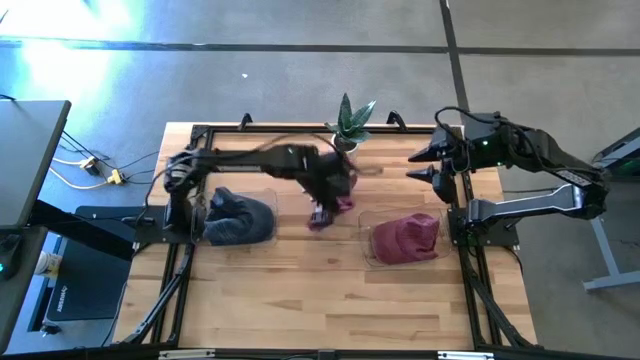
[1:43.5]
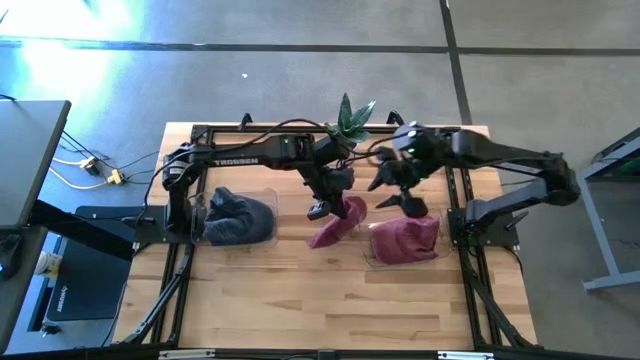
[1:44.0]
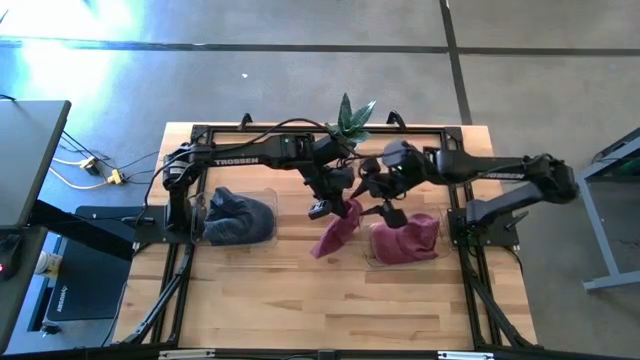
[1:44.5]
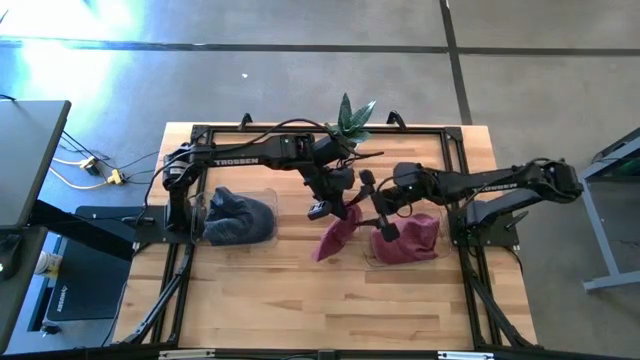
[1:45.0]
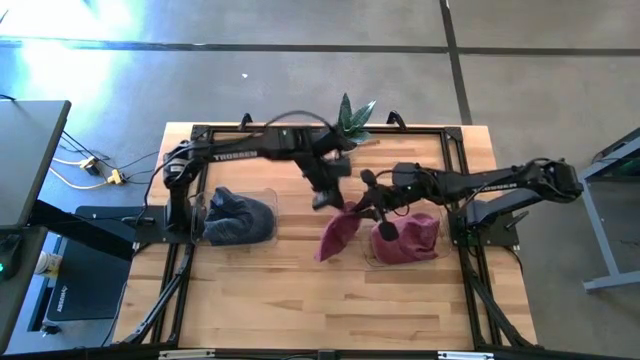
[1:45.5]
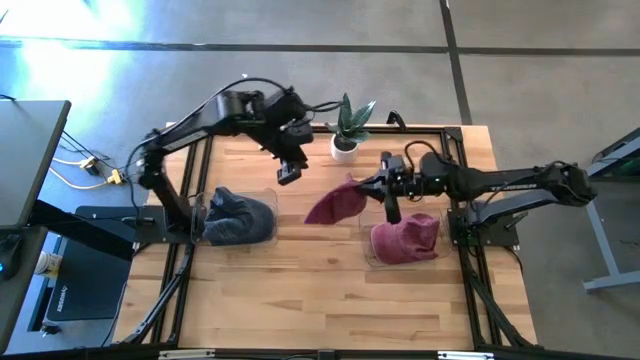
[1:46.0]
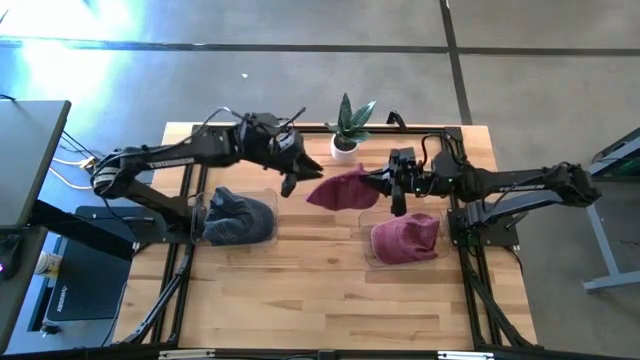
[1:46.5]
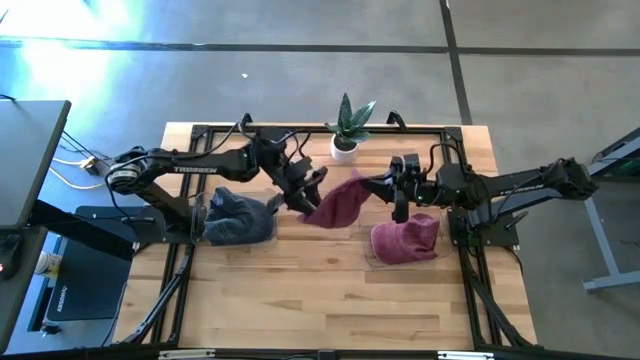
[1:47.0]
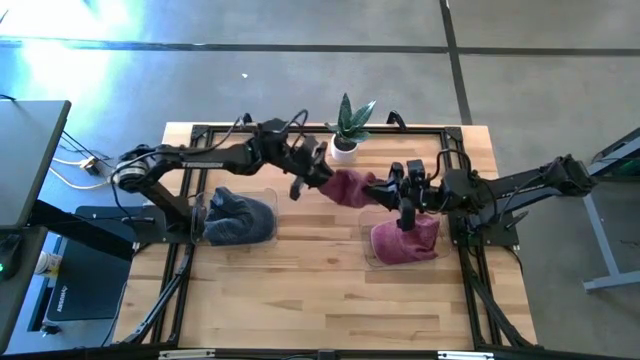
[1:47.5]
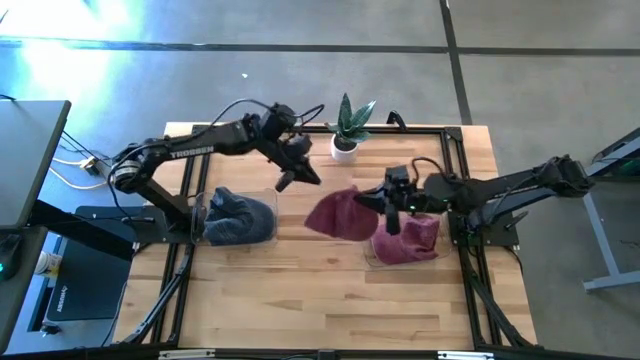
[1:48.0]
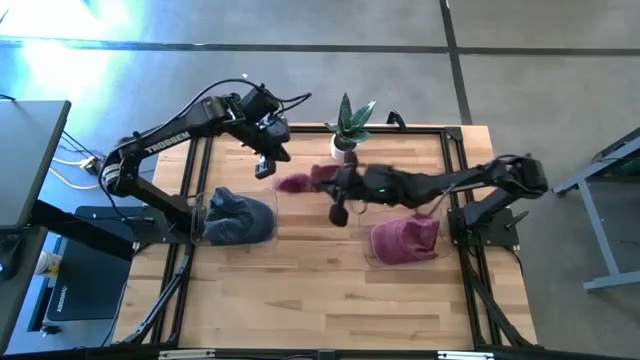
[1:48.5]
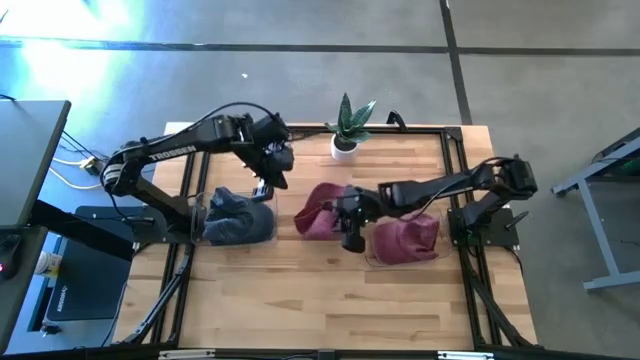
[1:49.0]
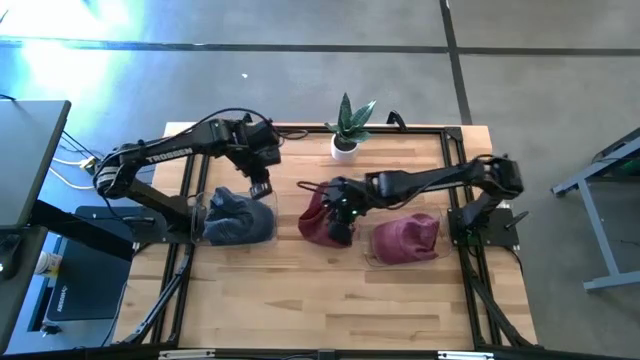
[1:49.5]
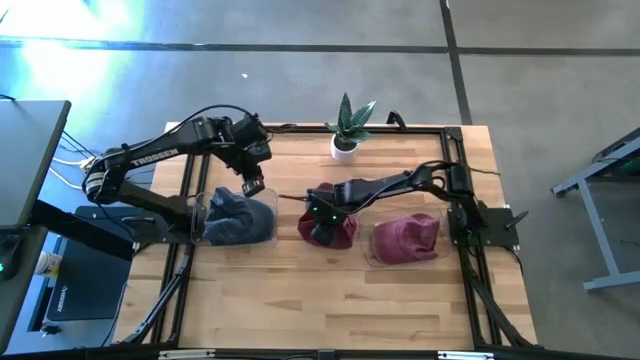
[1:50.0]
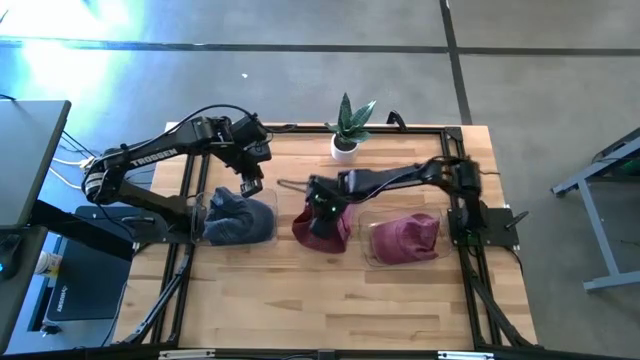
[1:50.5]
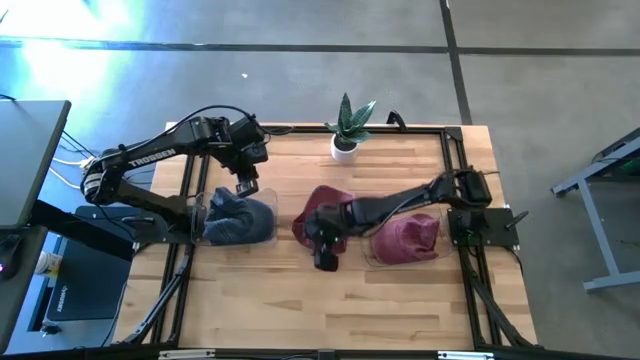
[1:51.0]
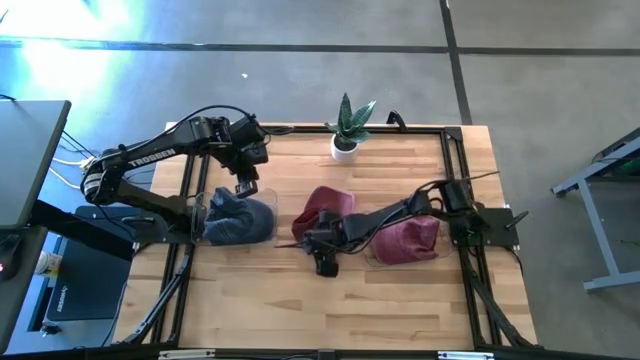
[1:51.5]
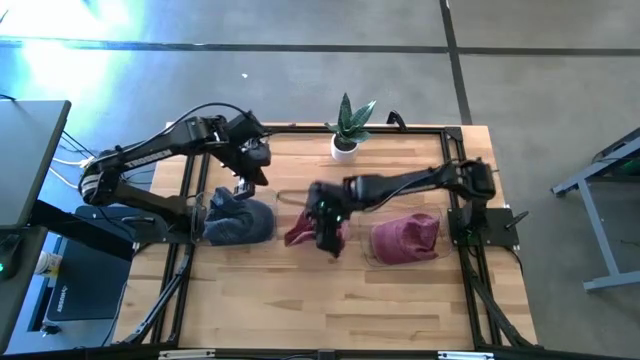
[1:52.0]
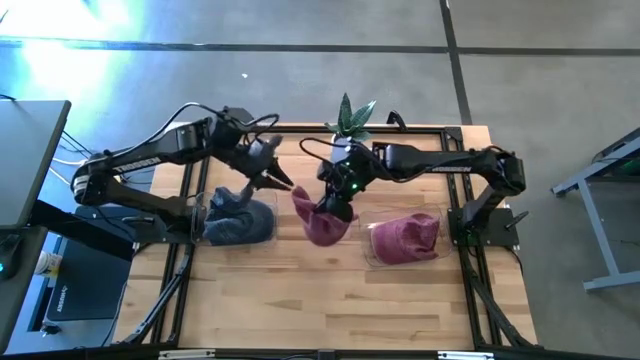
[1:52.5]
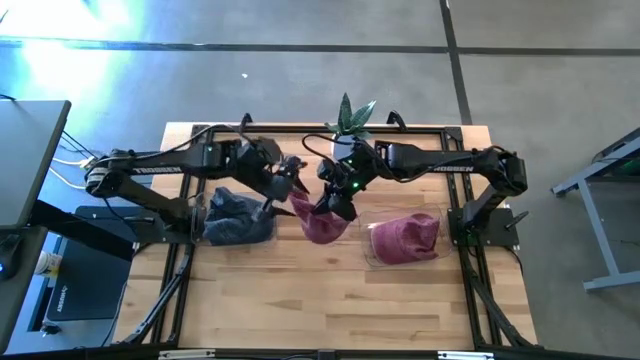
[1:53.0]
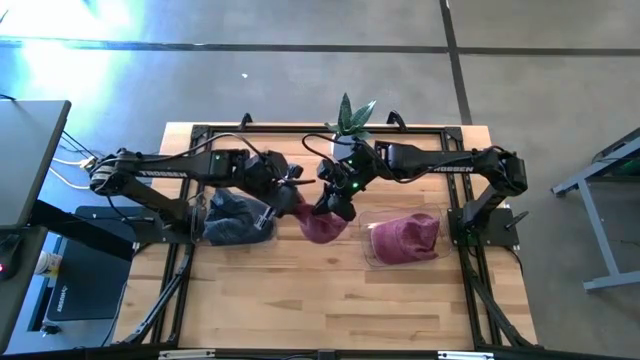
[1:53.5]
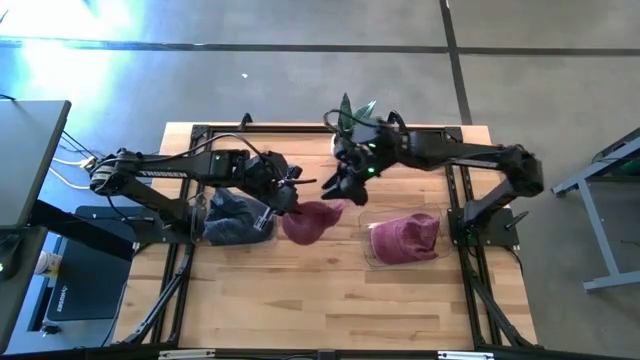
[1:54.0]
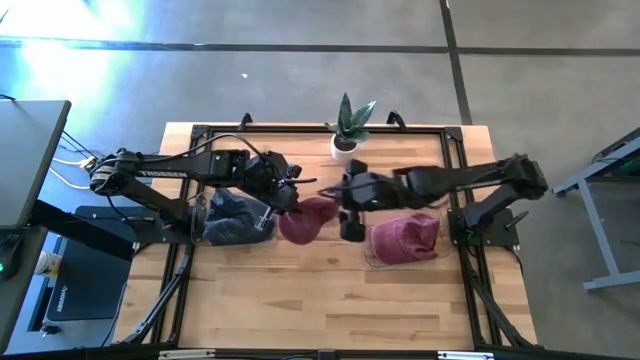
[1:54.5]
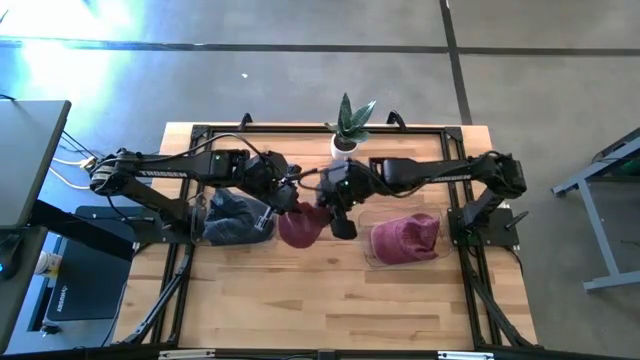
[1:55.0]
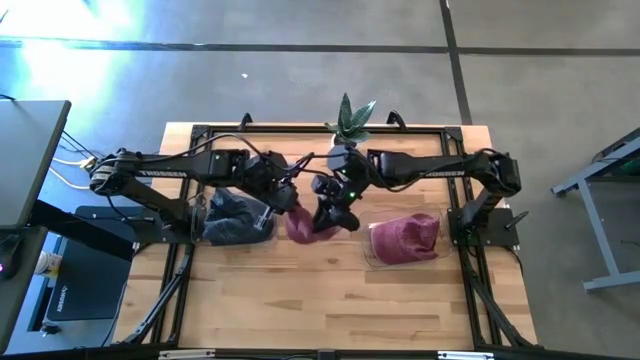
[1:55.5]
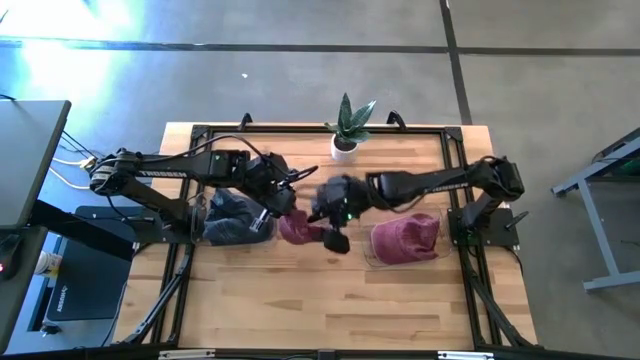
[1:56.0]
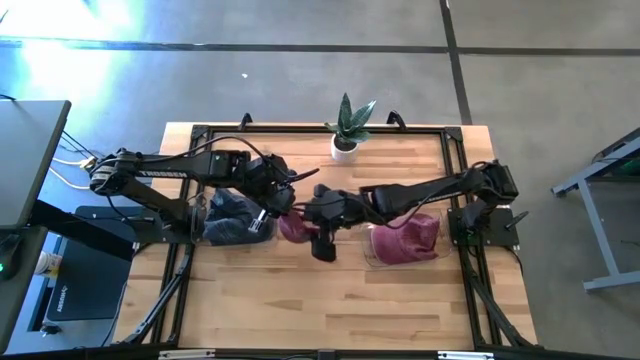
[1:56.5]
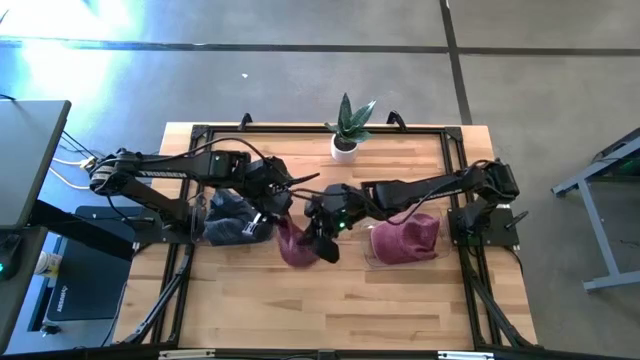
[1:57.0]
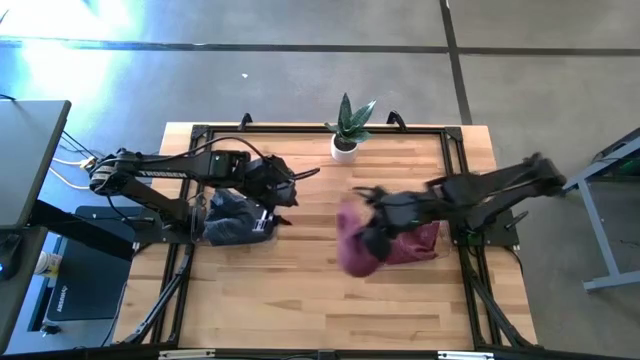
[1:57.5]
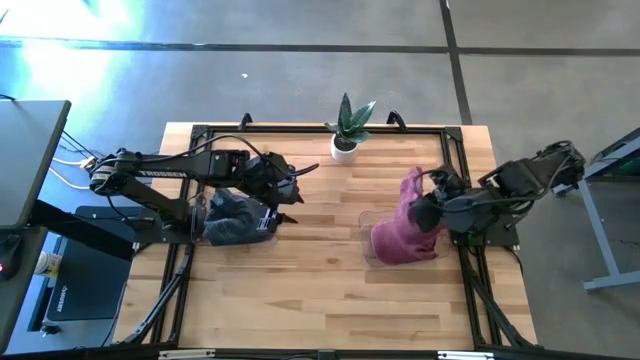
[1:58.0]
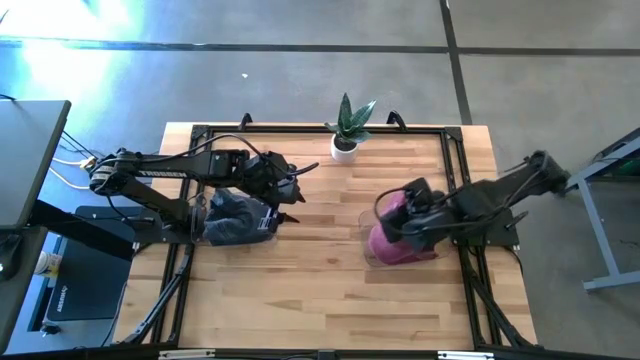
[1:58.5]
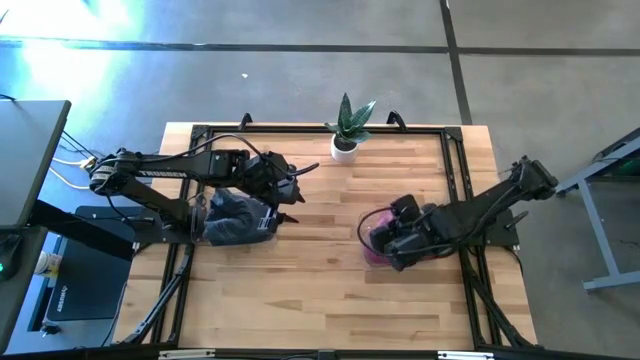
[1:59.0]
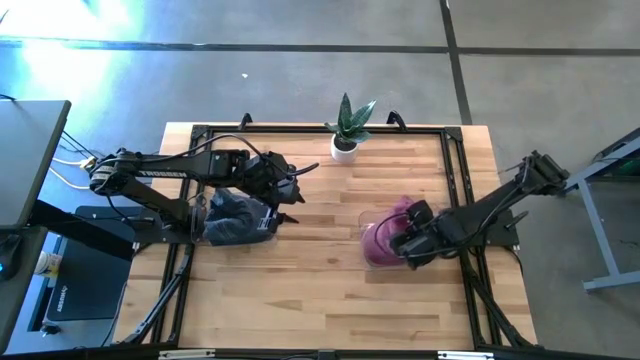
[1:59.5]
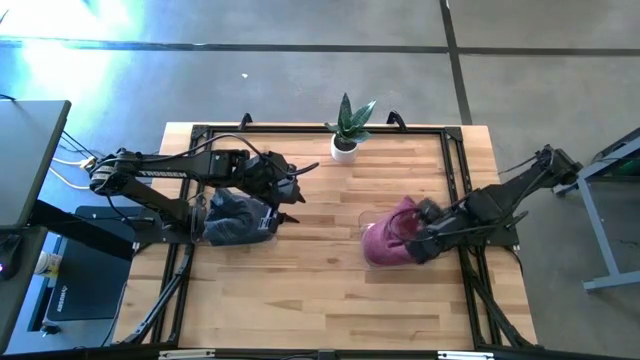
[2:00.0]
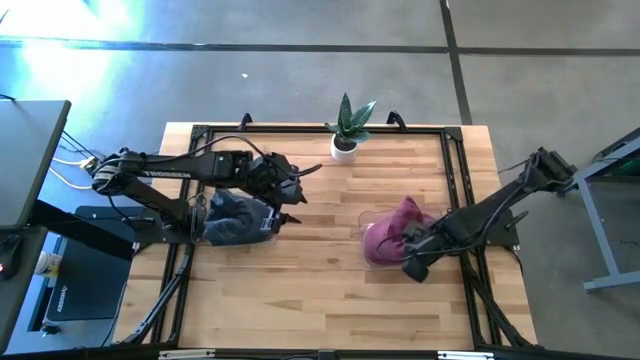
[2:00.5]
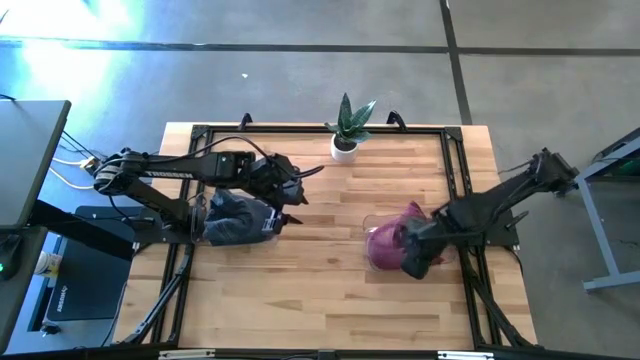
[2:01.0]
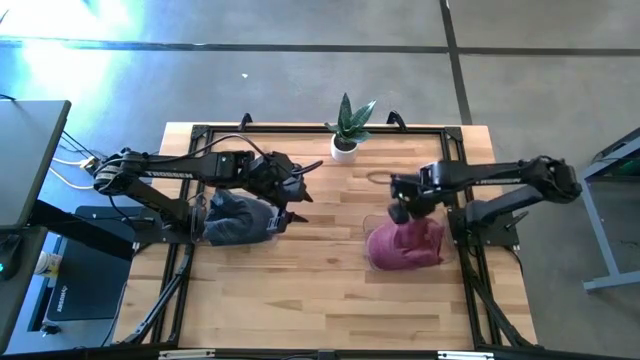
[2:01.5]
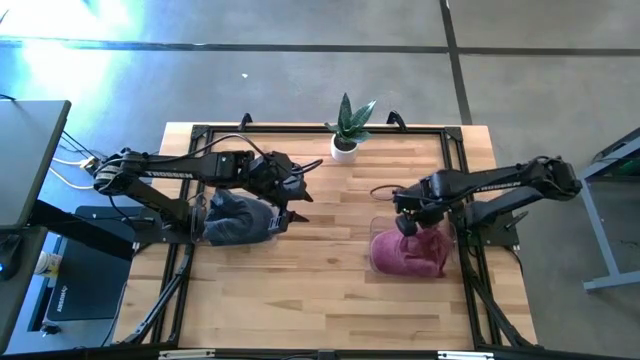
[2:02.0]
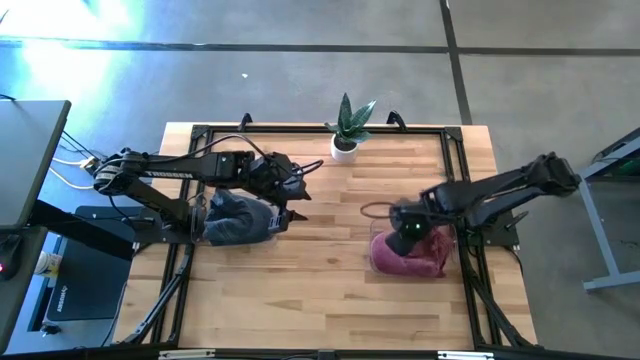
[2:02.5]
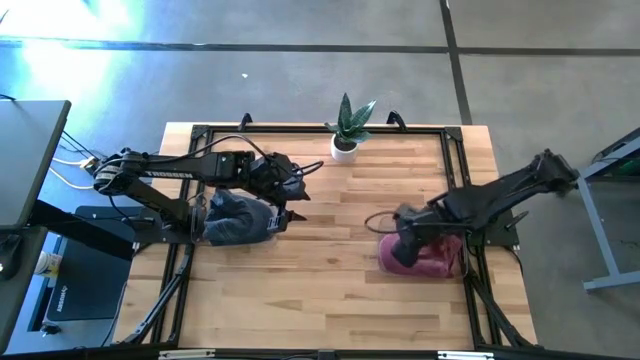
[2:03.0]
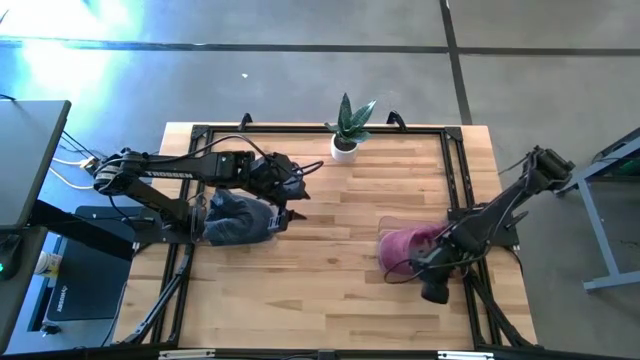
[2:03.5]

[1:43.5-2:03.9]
Task: Pick & Place hat
Put the red cap into the right transparent bin

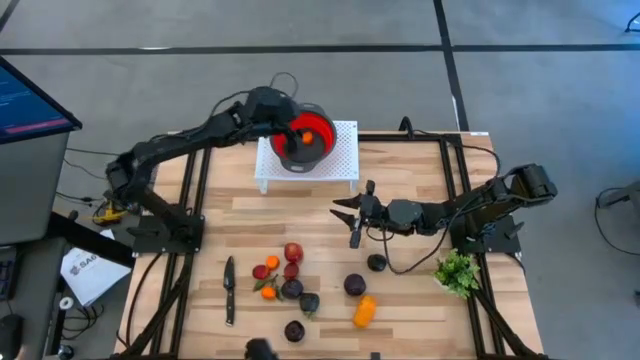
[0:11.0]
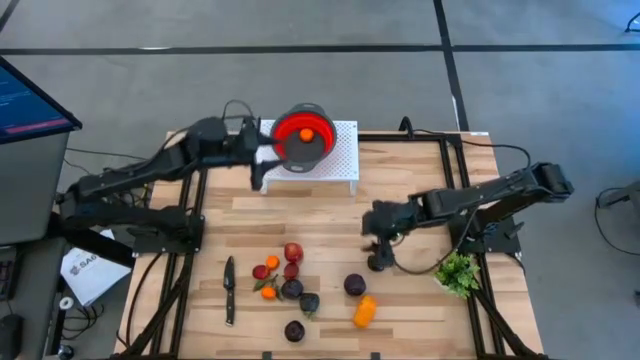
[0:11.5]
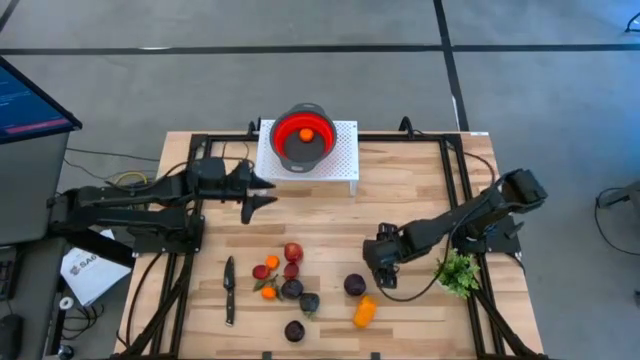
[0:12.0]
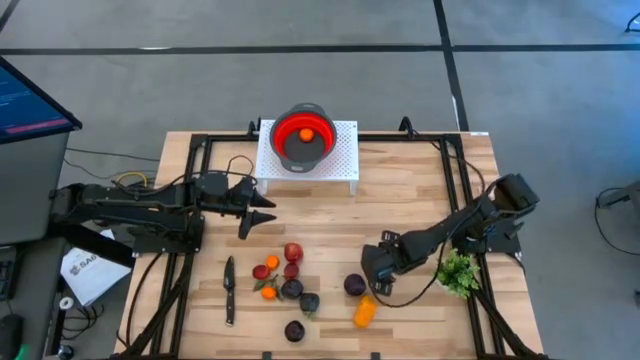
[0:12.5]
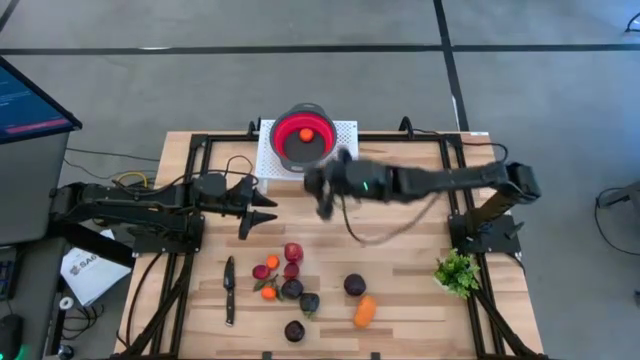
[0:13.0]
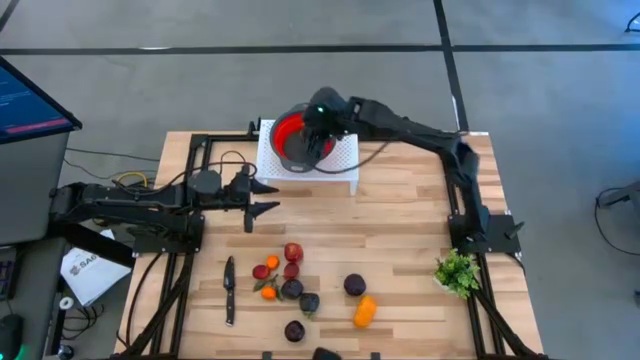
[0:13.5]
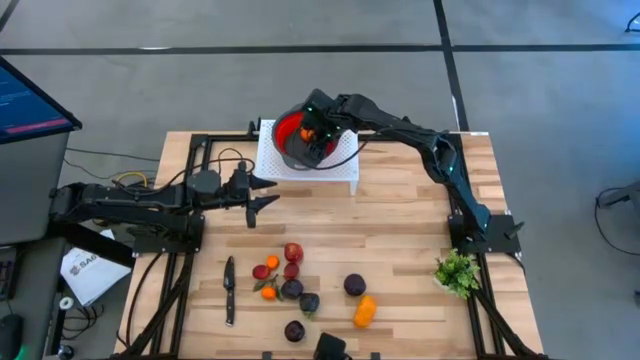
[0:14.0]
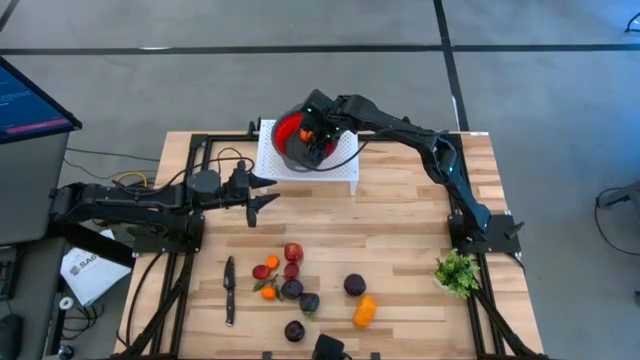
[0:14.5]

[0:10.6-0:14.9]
Task: Pick & Place Fruit
Put the plum into the red strainer bowl
